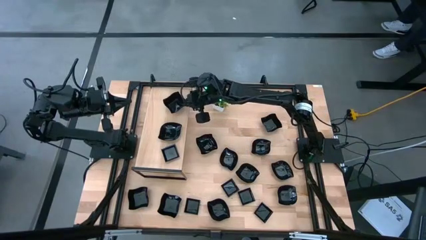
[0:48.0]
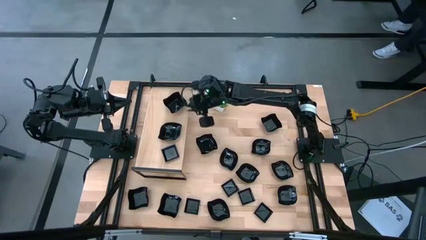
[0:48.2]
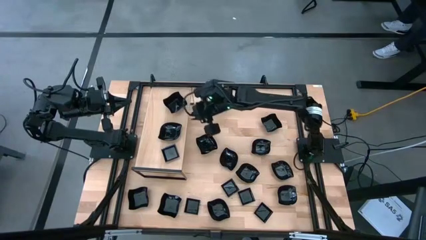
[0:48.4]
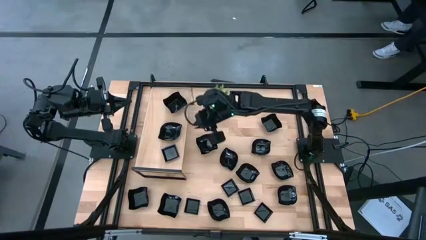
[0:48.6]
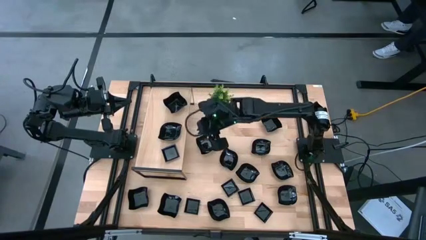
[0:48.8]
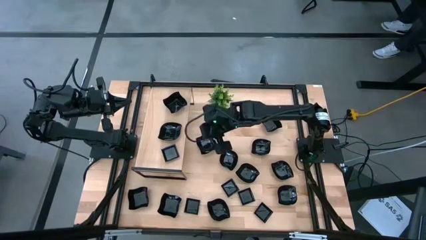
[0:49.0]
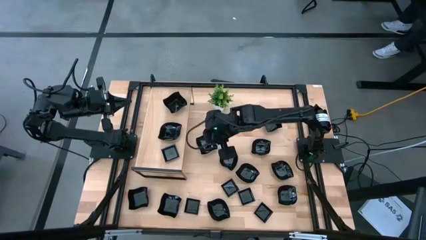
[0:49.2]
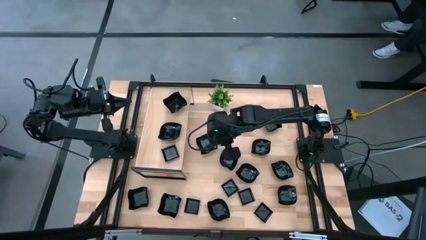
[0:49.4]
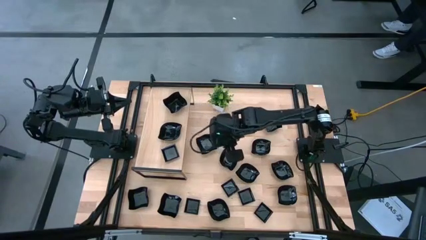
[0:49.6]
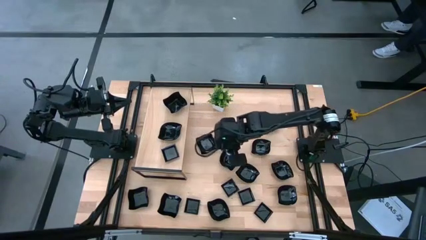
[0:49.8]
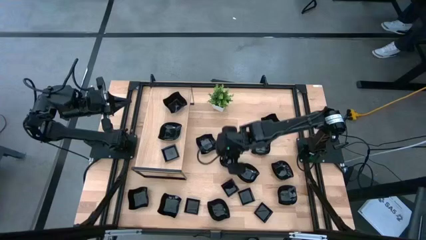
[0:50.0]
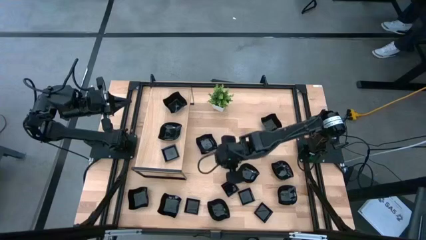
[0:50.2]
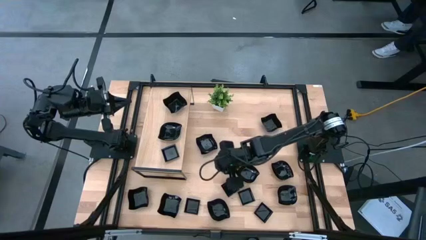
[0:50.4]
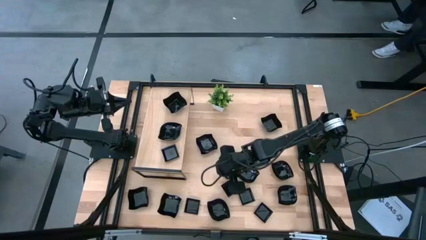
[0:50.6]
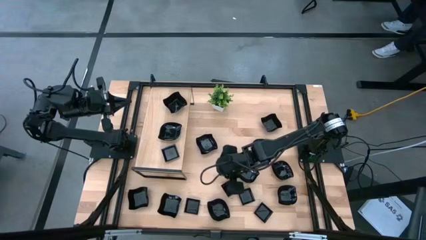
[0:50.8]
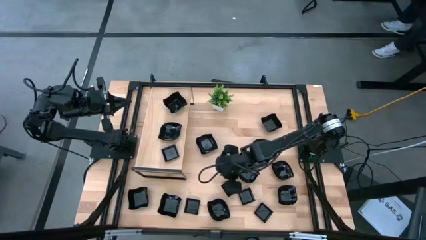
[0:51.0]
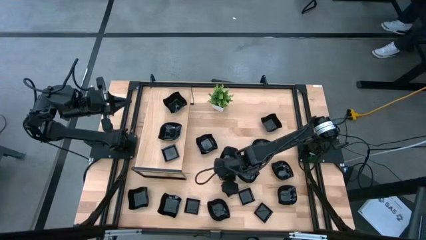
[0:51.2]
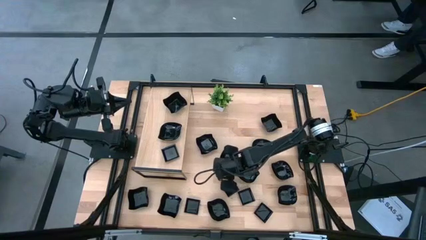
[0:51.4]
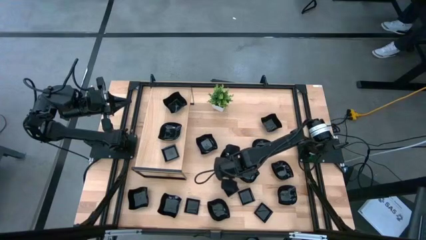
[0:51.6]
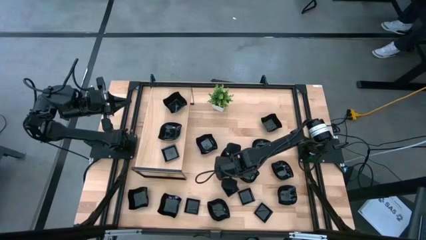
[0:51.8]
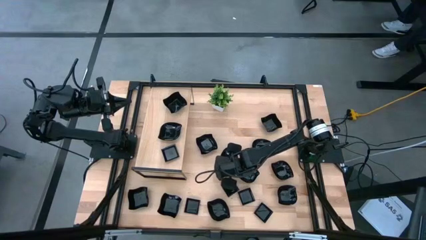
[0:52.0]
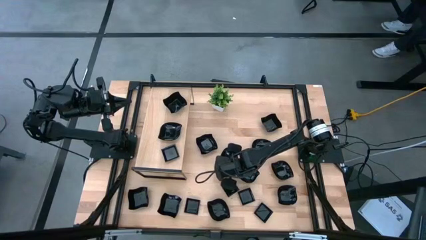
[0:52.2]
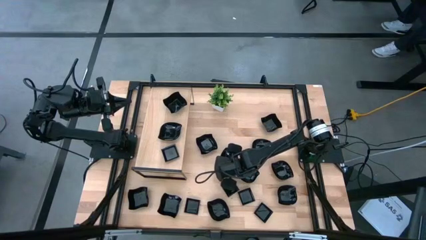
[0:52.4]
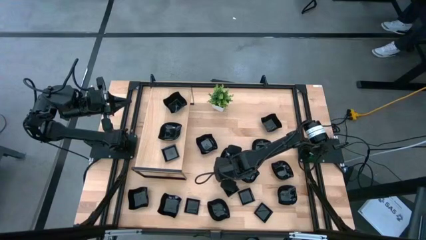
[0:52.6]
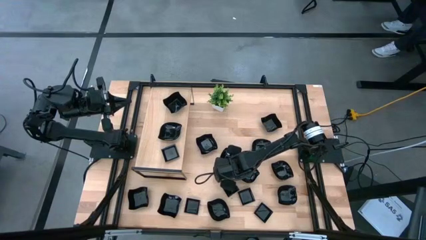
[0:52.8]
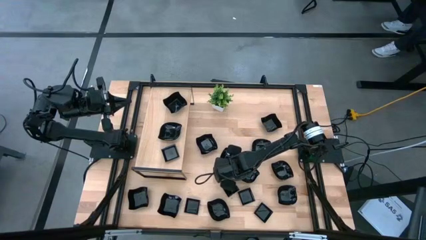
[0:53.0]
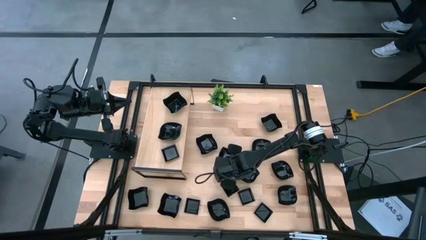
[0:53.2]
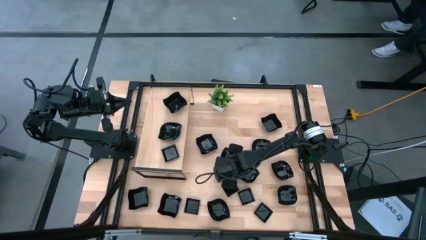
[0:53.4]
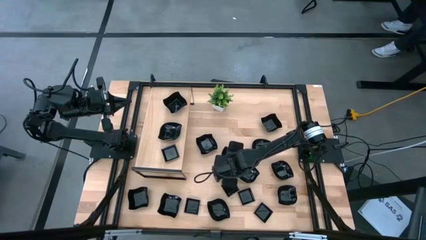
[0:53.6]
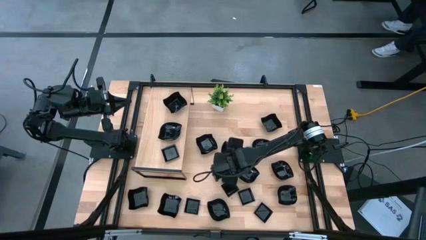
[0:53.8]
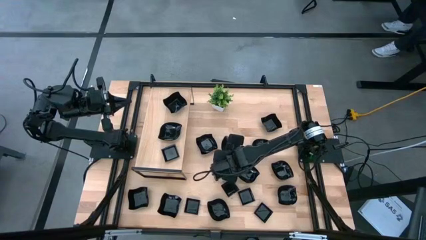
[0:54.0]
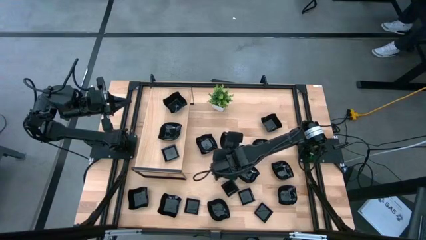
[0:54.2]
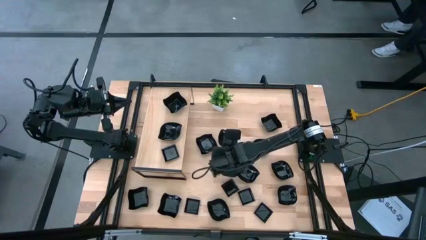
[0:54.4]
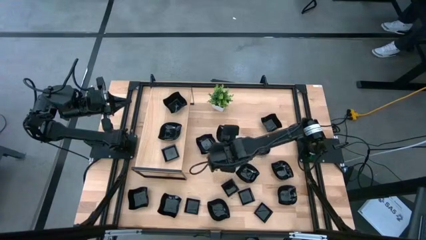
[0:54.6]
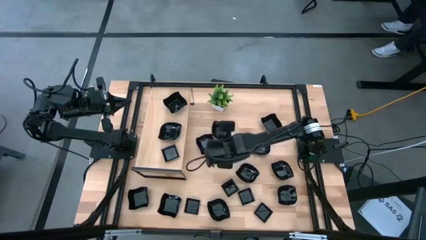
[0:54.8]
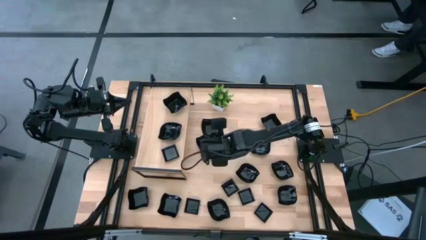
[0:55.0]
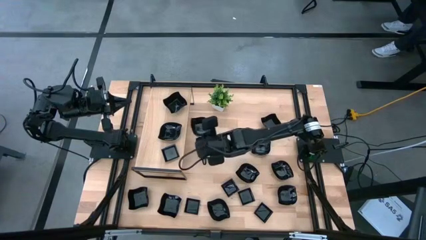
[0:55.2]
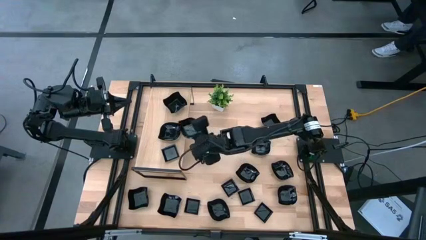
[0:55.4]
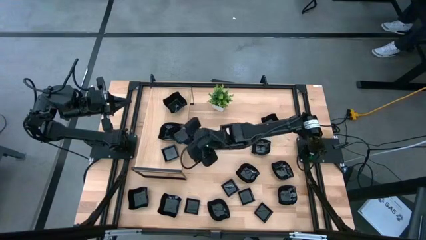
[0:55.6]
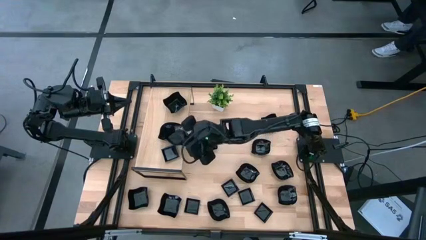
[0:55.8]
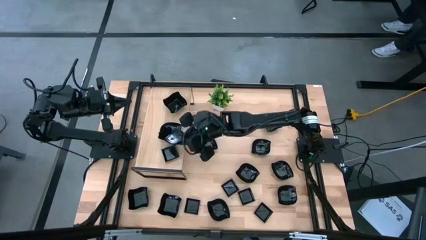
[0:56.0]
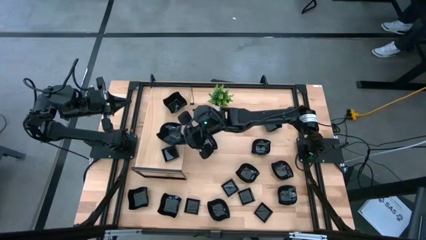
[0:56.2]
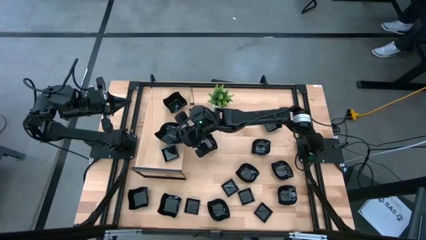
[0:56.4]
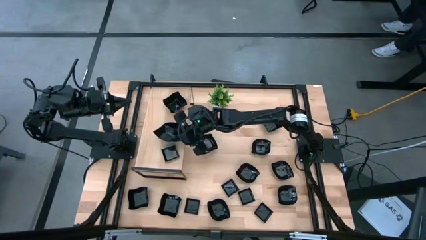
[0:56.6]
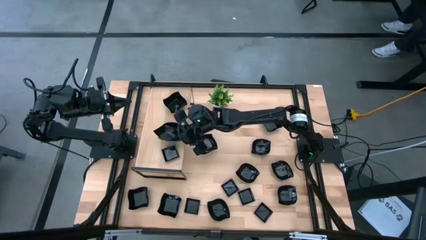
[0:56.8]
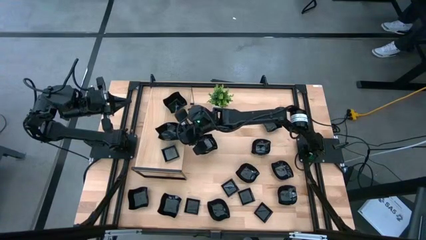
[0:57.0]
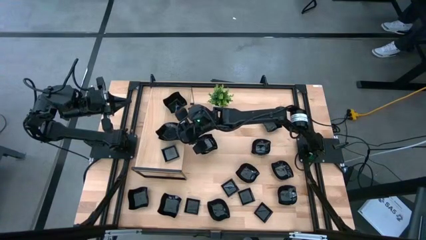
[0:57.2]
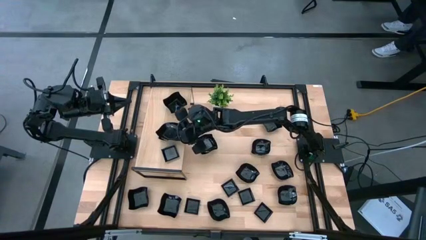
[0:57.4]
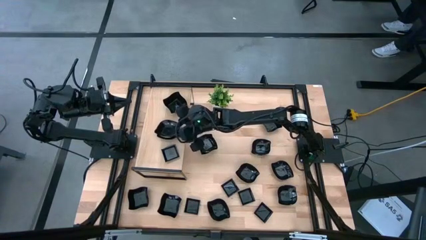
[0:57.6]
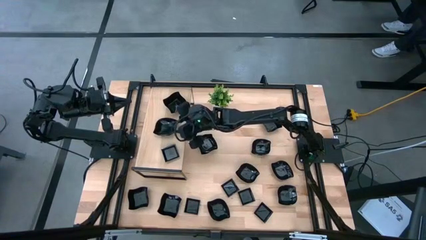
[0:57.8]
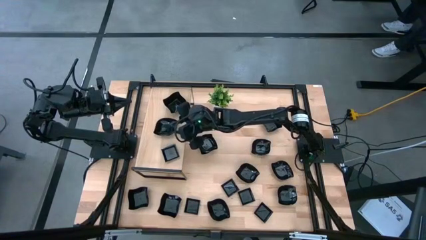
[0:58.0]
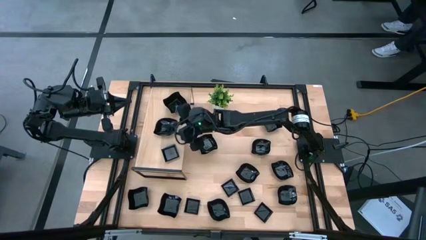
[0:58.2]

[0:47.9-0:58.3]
Task: Pick & Place Mini shaped plates
Stack the black leaf shape plate on top of the black leaf shape plate on the shelf

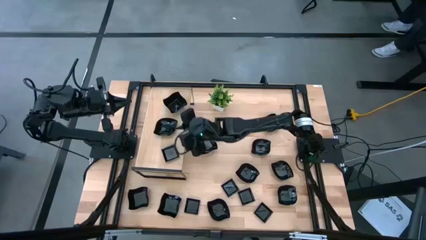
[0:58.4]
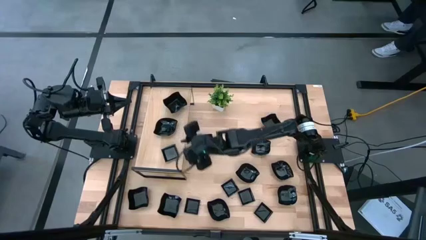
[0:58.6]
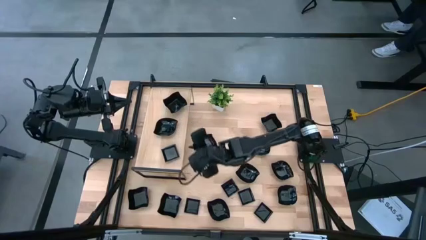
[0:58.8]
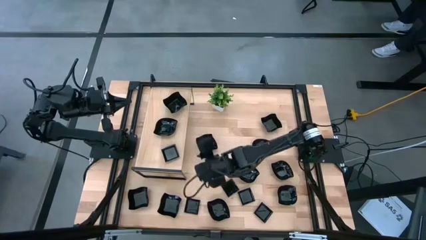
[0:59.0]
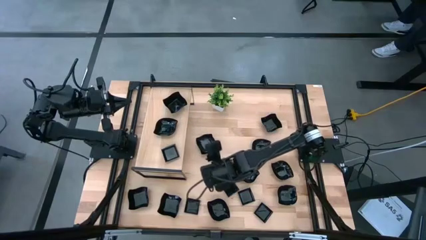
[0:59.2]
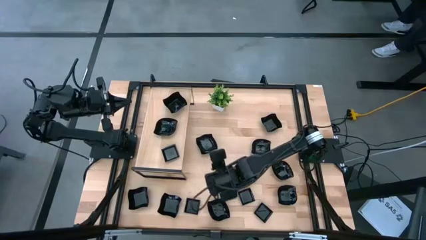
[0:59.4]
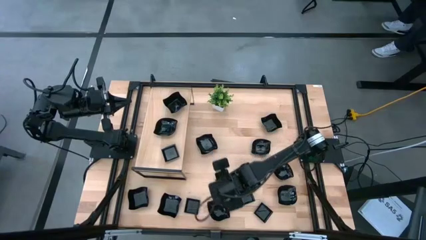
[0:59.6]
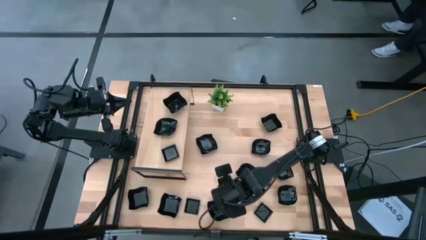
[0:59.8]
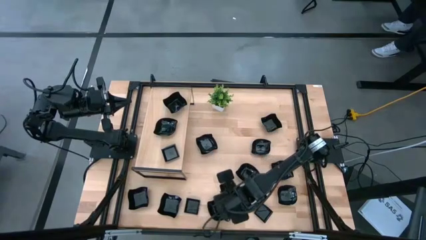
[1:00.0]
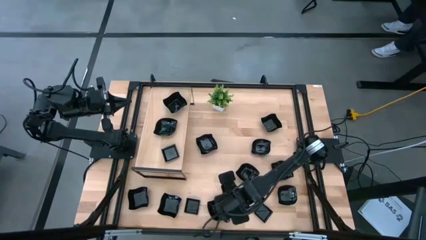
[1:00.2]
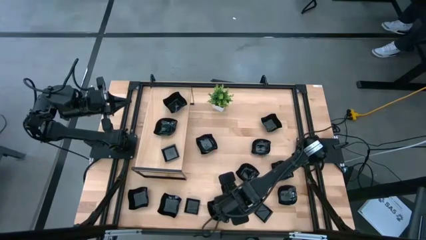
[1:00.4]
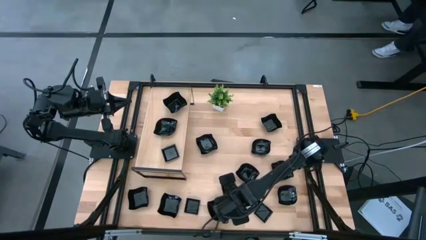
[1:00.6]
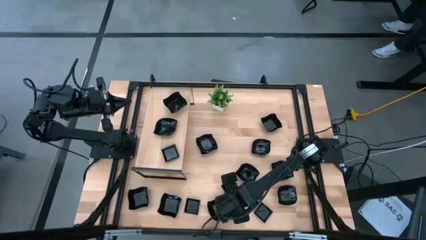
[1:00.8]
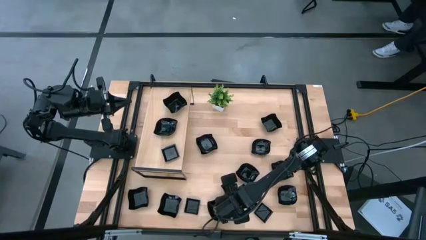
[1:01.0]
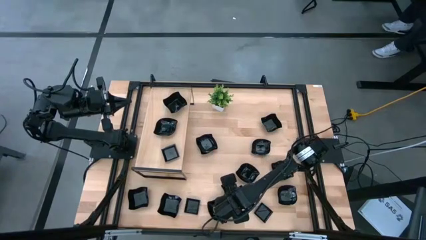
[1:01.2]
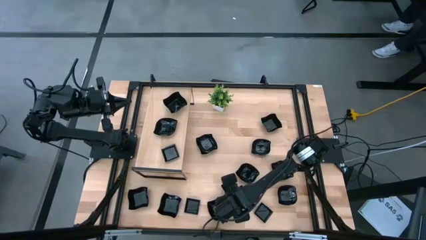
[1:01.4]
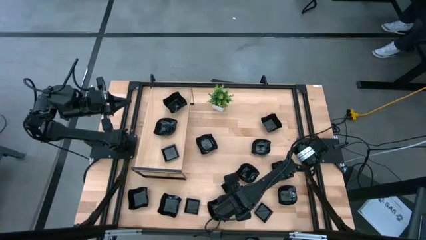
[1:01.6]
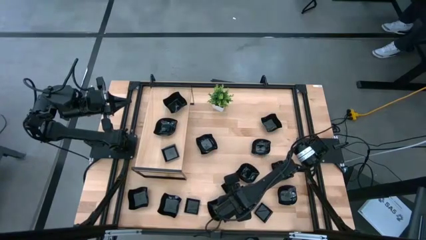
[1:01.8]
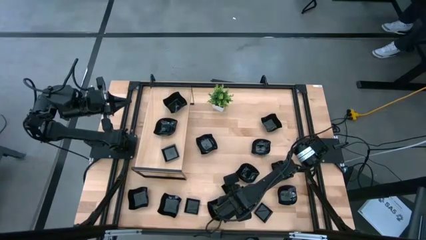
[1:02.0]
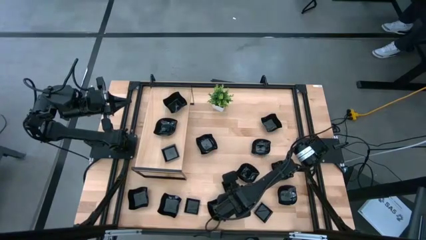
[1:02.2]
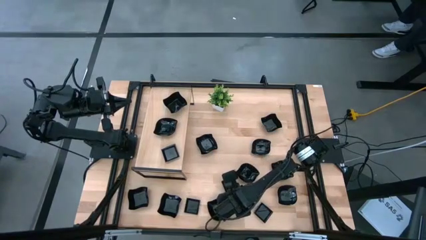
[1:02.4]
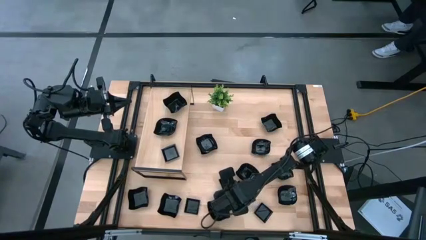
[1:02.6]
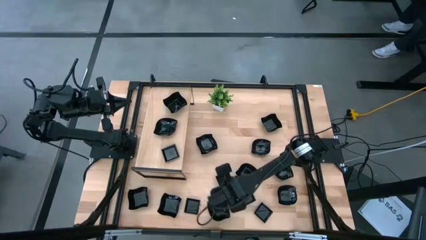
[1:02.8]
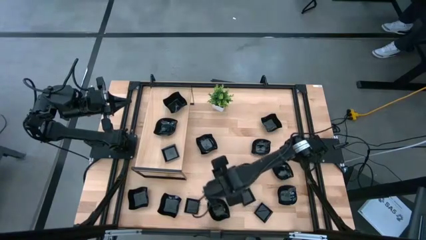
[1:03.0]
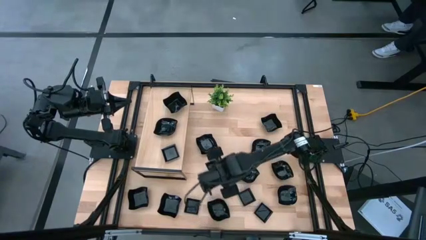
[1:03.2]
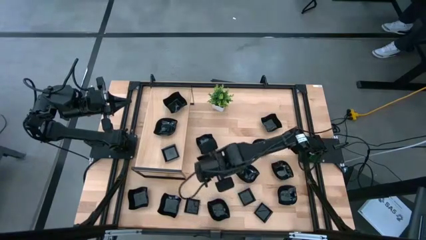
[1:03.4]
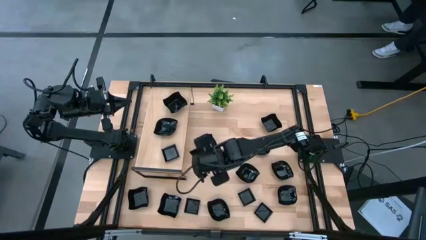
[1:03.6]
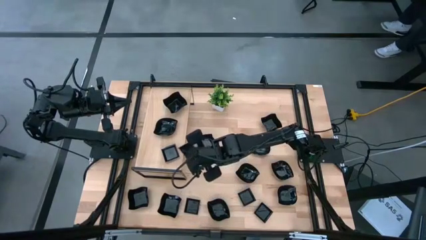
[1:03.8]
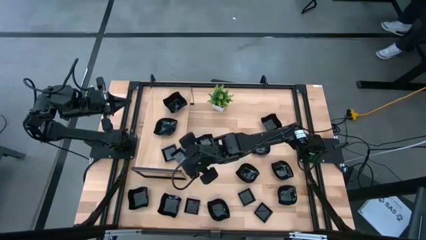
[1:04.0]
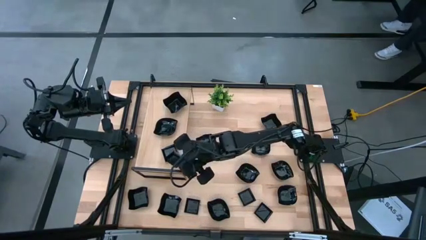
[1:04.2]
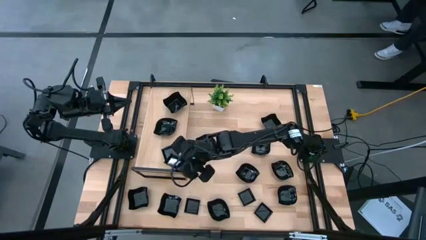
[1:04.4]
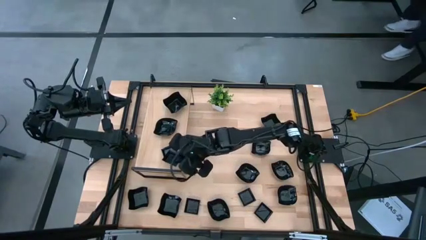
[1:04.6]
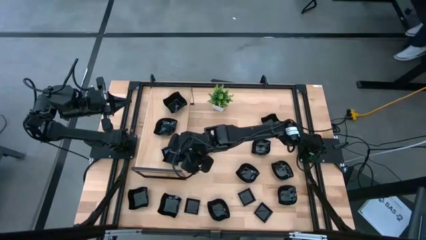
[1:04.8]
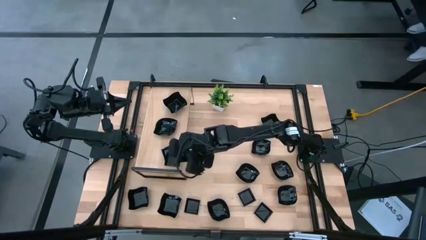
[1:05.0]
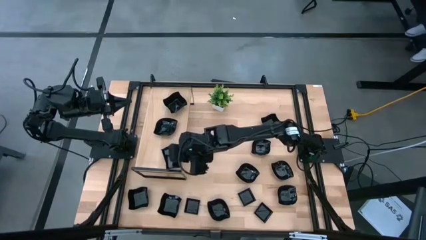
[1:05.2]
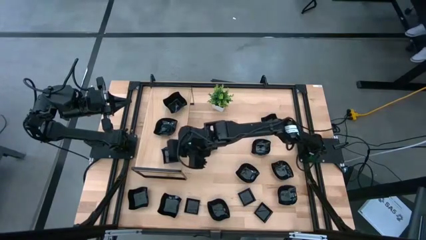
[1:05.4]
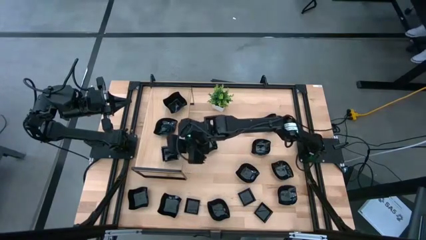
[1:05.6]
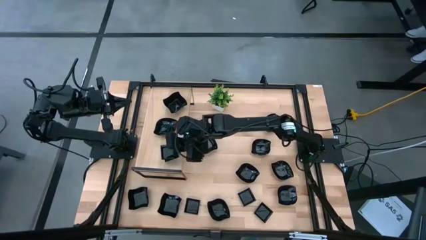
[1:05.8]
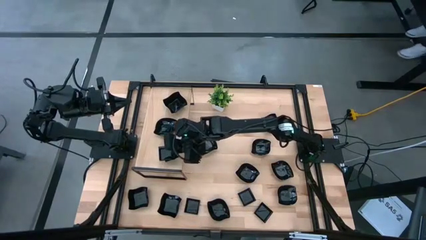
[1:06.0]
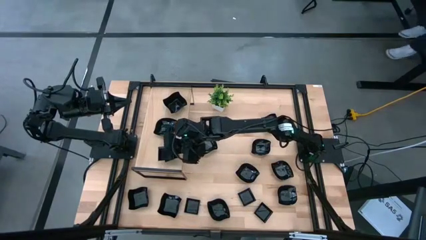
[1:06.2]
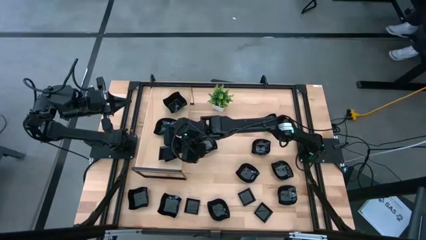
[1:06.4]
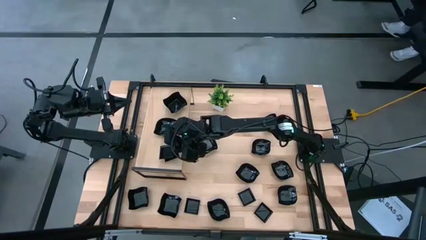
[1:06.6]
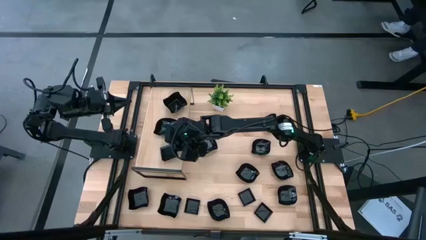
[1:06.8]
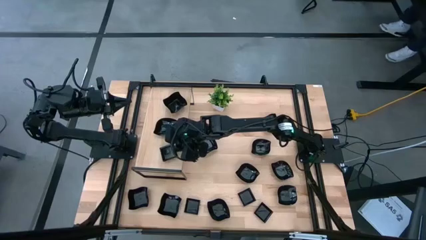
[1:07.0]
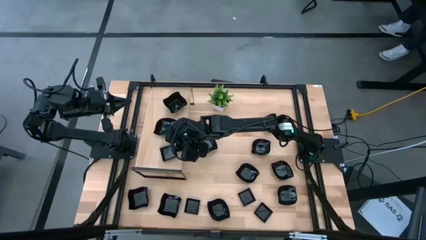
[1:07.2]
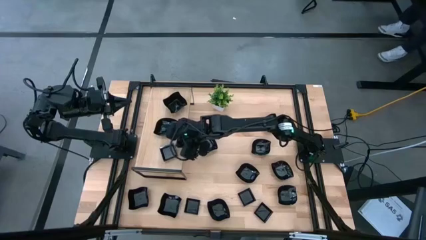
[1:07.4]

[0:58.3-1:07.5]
Stack the black square plate on top of the black square plate on the shelf
